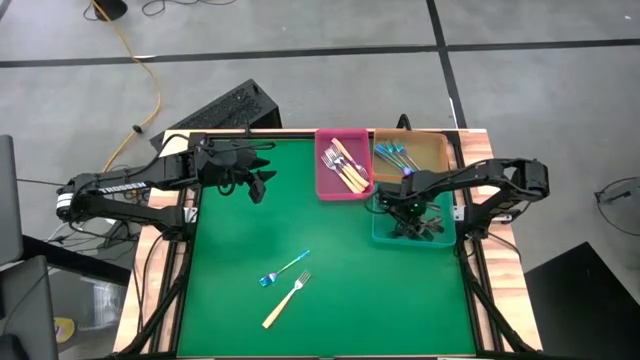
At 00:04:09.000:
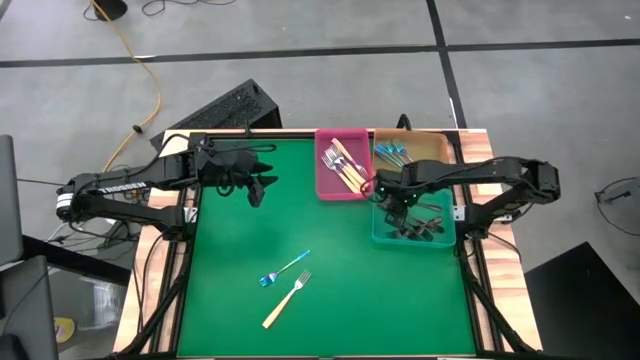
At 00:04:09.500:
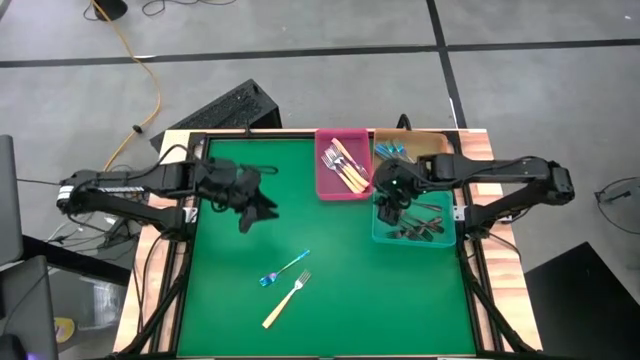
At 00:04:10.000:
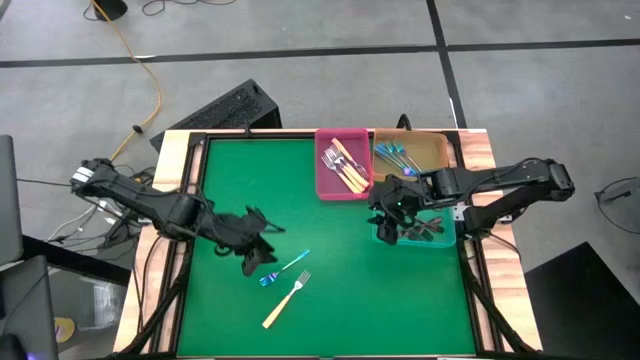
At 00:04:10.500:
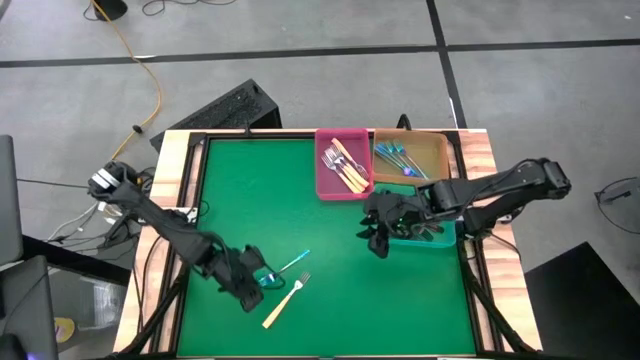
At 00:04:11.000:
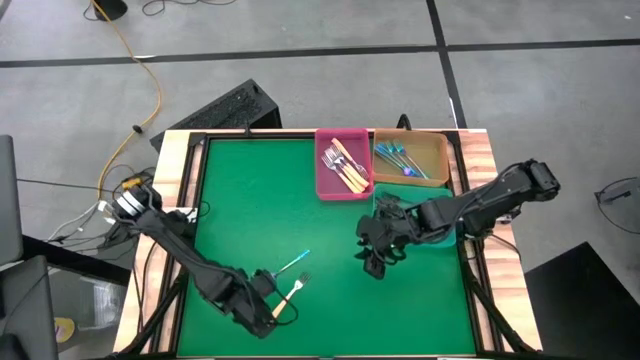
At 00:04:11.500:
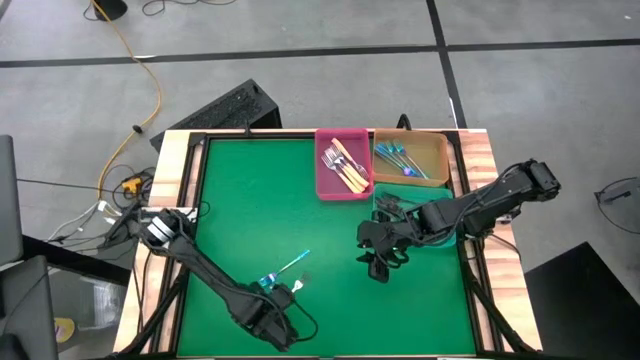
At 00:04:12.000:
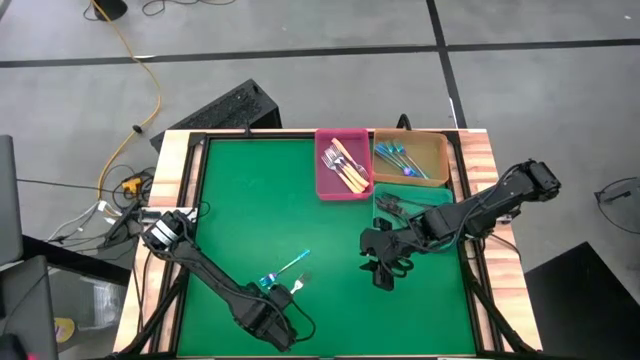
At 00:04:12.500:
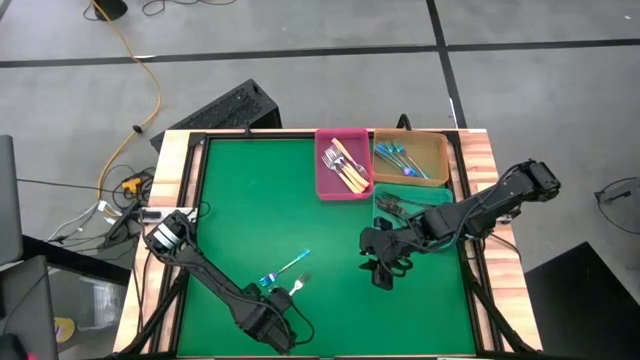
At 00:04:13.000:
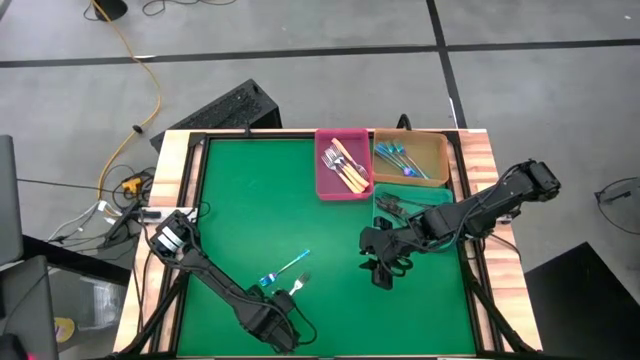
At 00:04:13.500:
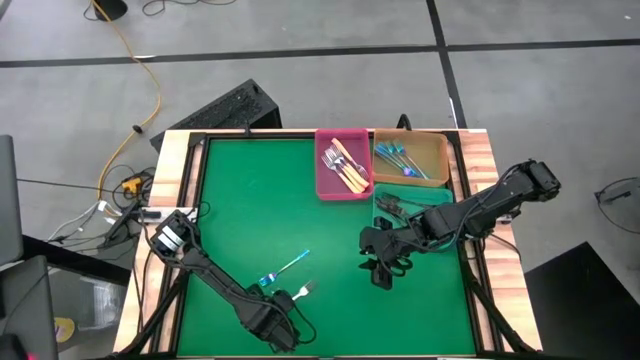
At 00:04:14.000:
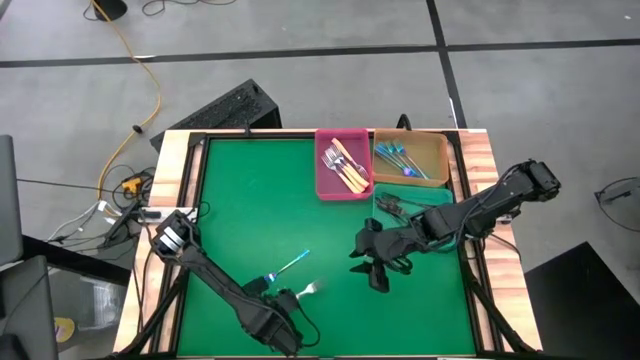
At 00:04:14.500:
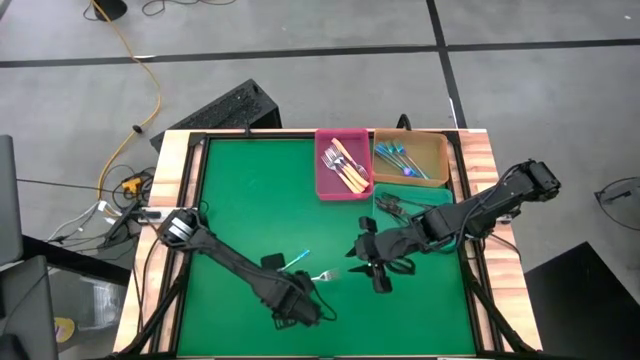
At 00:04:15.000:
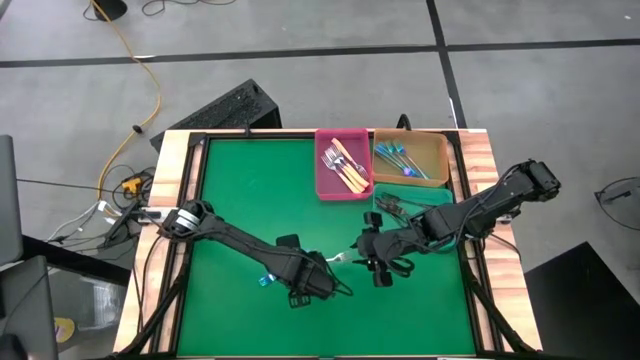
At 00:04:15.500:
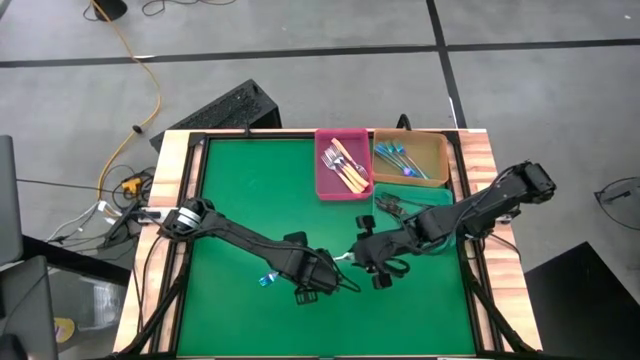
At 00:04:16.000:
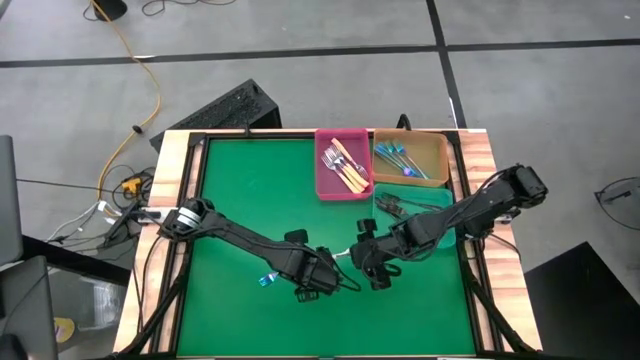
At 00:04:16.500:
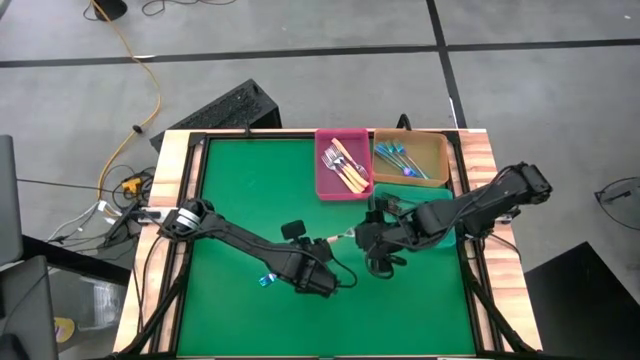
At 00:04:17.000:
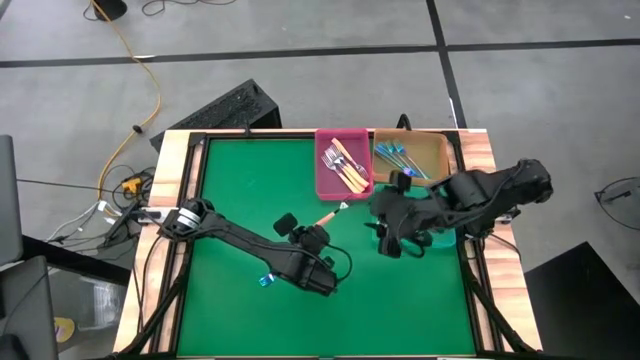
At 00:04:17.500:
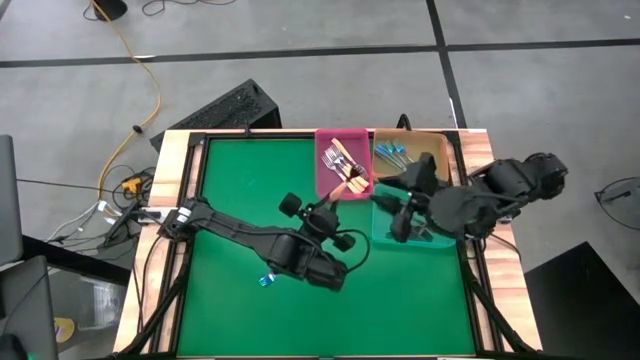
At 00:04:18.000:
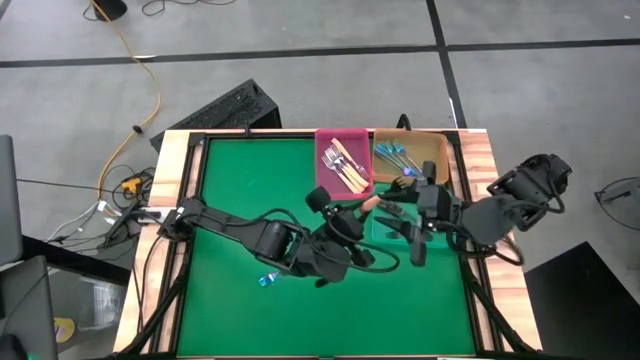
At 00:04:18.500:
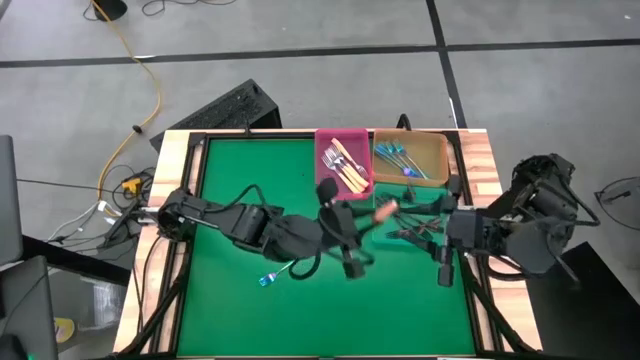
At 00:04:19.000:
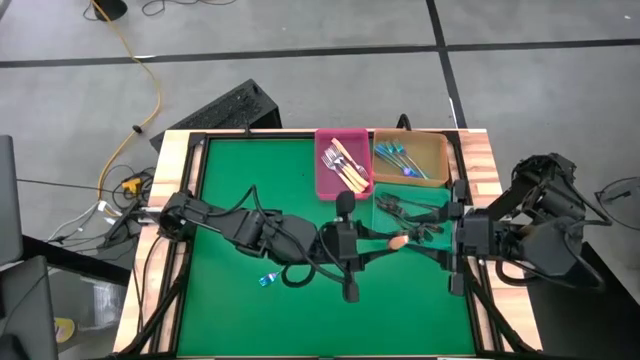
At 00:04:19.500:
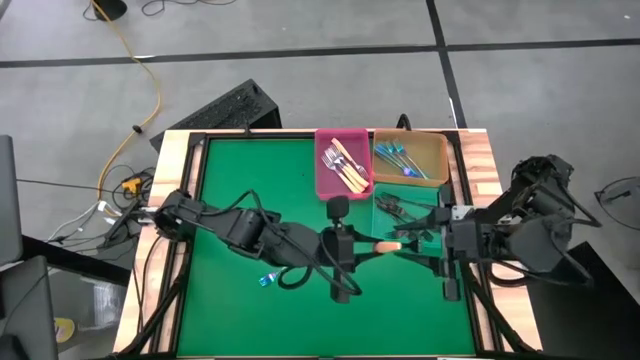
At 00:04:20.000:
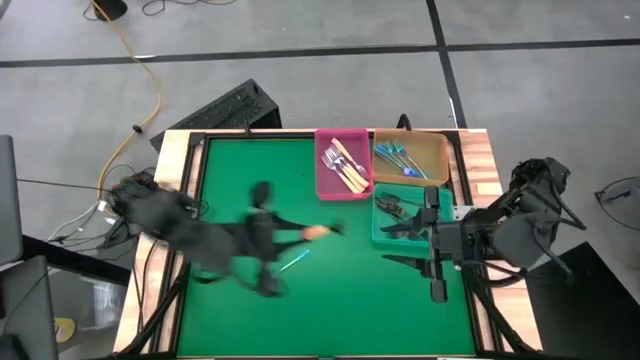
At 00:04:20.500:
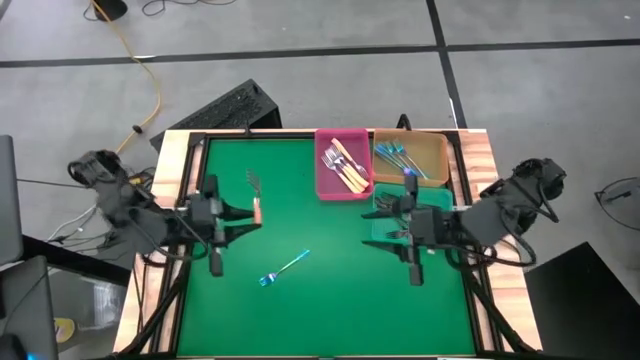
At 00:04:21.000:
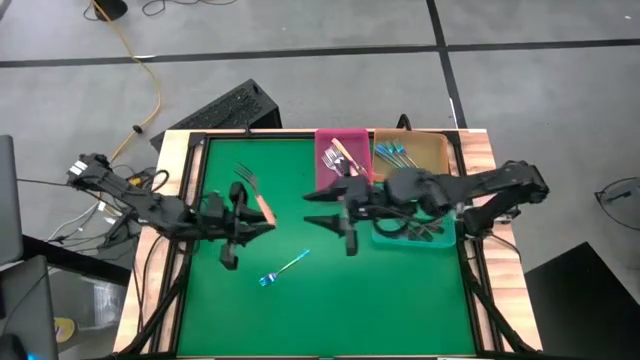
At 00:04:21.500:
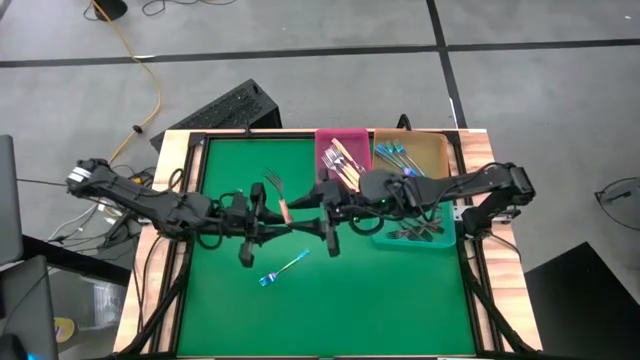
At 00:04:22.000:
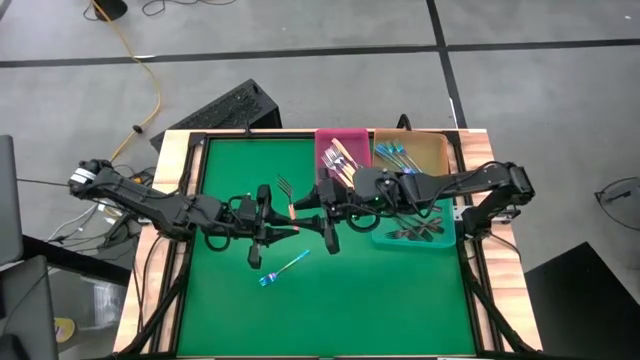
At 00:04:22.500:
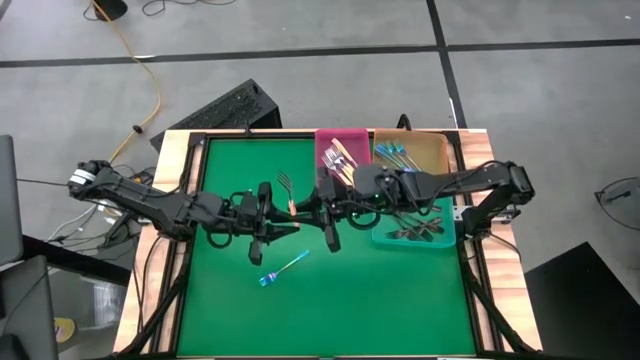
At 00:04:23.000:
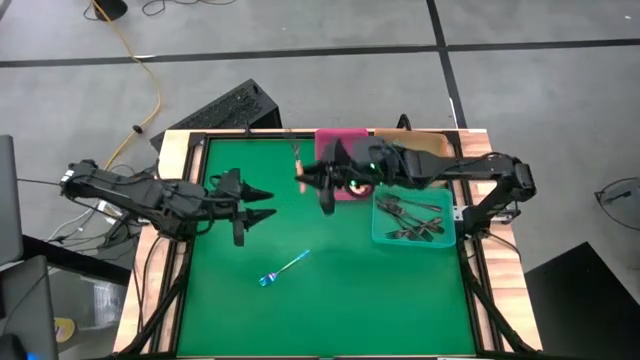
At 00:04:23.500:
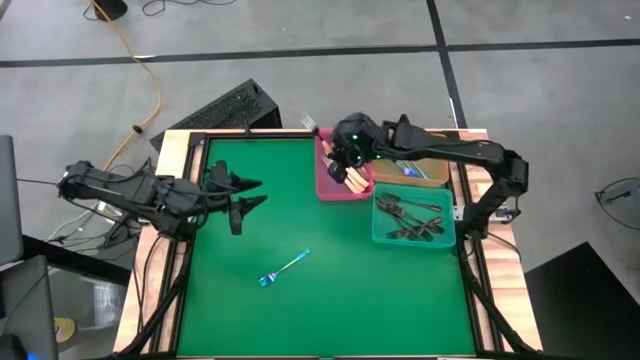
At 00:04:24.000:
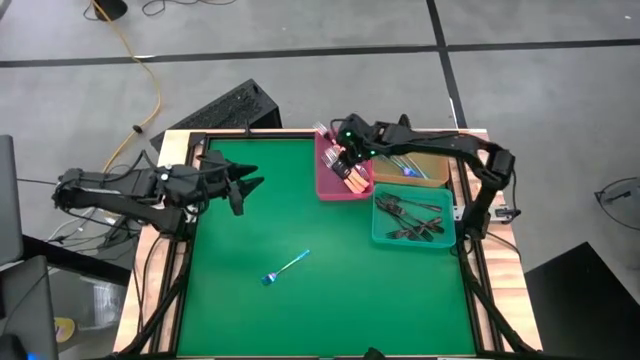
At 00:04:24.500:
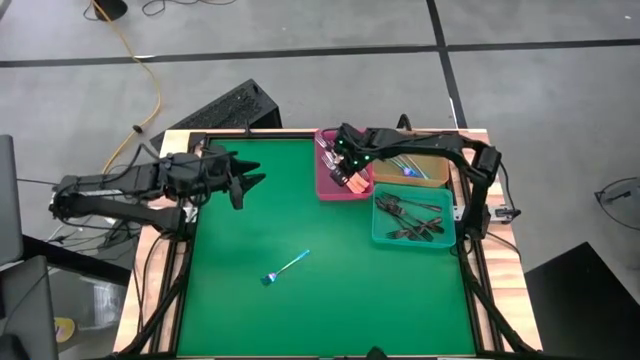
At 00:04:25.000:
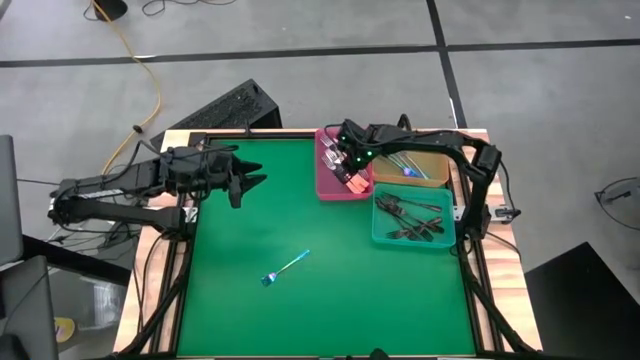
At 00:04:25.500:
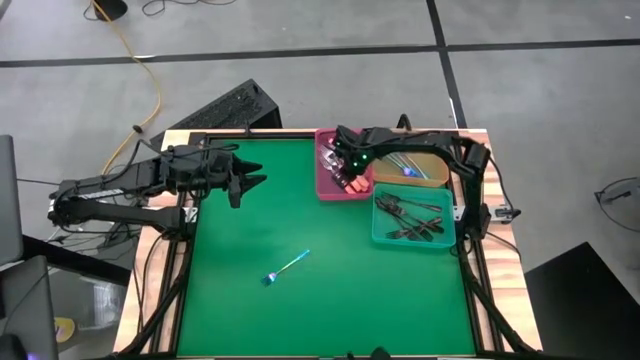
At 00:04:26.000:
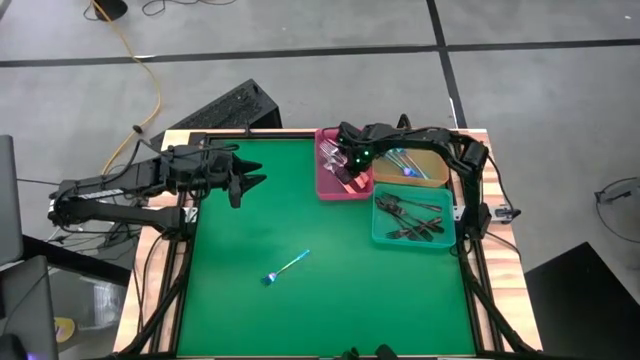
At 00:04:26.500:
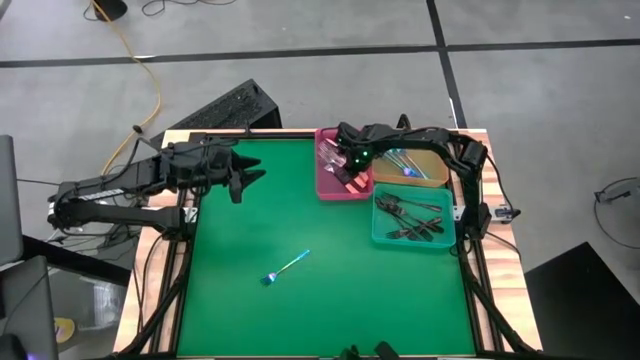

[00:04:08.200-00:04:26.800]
Task: Sort silverware by color (type)
Put the yellow fork into the pink bin

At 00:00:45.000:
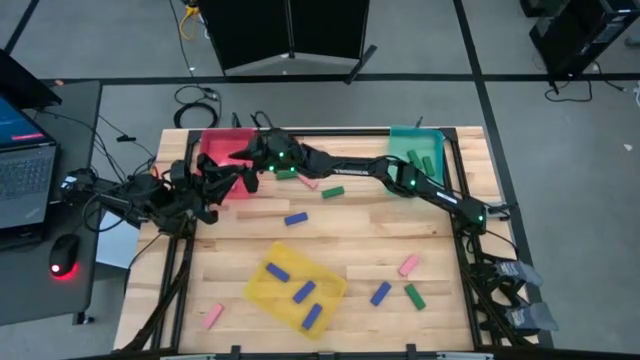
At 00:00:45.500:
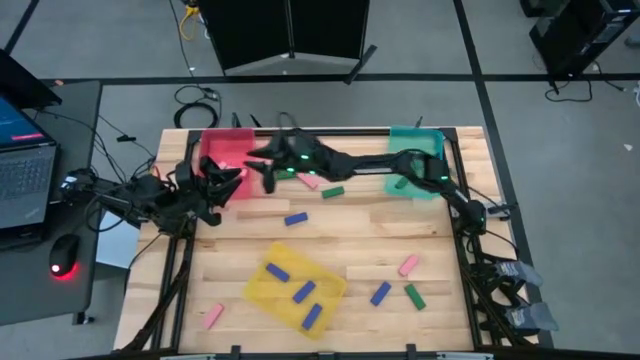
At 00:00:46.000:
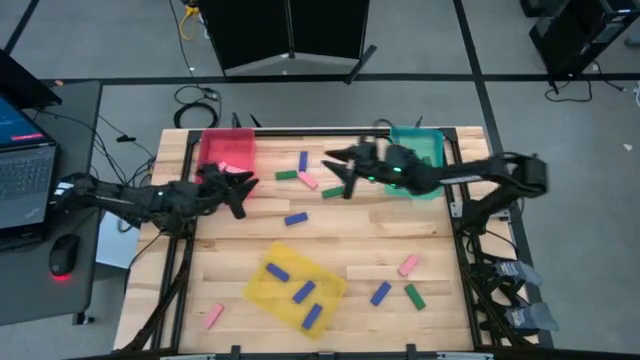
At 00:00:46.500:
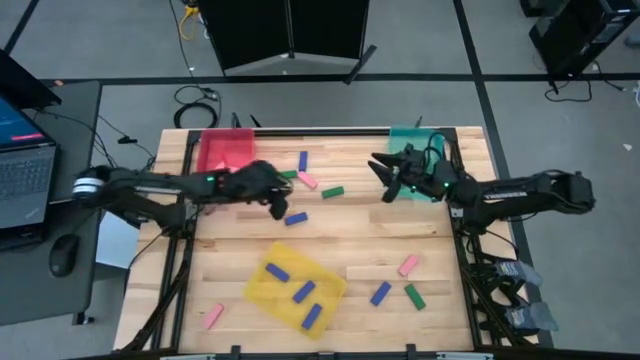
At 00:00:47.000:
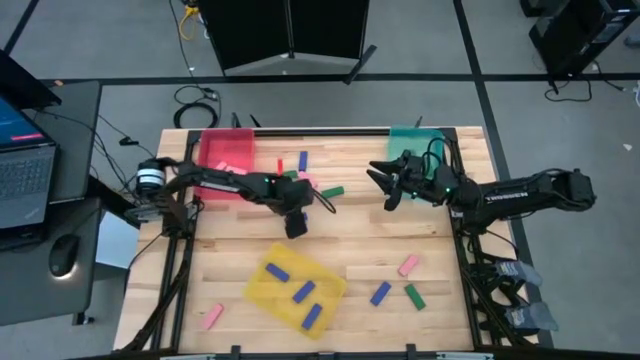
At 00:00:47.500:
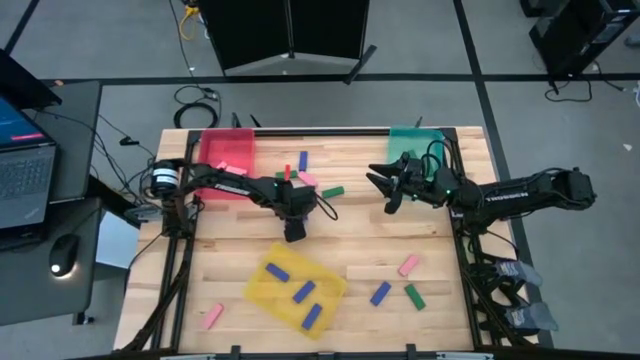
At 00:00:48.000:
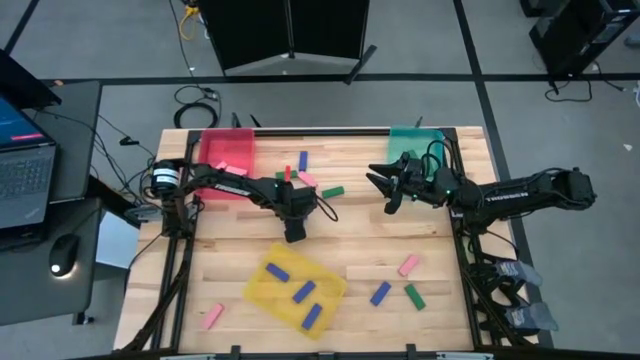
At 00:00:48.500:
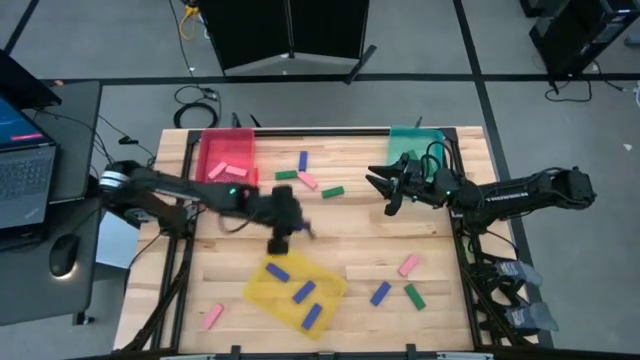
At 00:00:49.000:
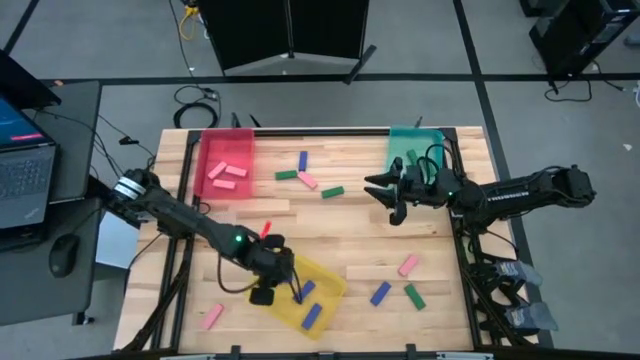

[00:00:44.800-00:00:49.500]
Task: Sort blocks
Put the blue block into the yellow bin
